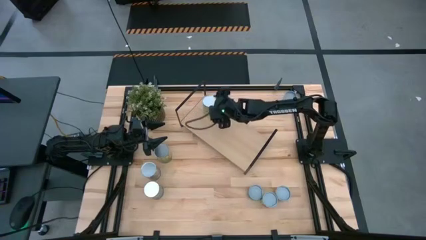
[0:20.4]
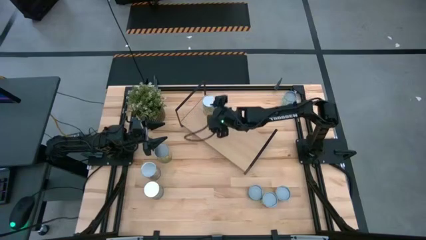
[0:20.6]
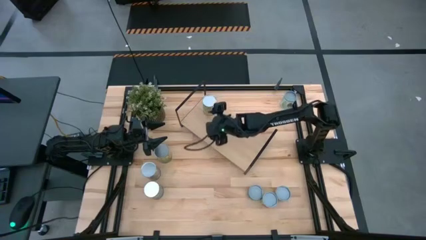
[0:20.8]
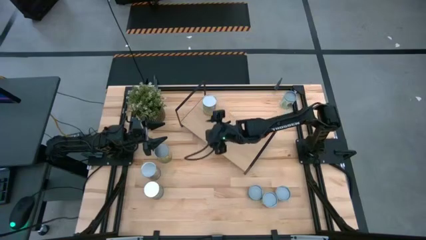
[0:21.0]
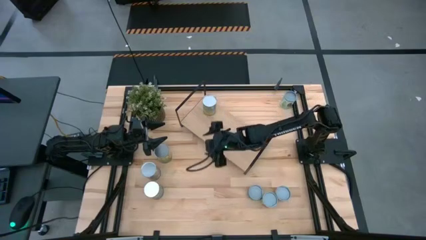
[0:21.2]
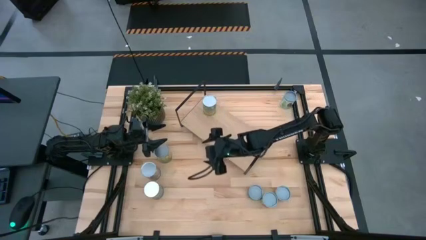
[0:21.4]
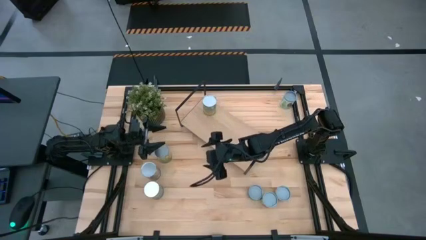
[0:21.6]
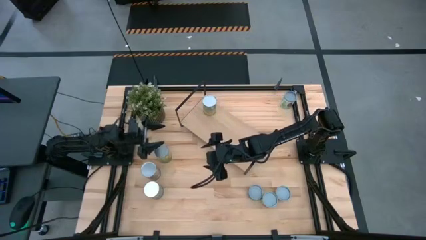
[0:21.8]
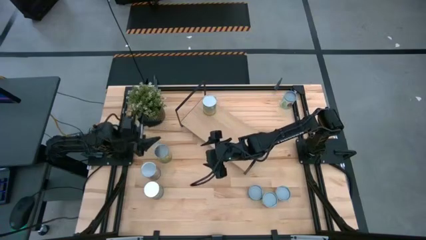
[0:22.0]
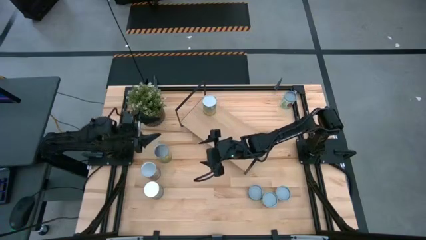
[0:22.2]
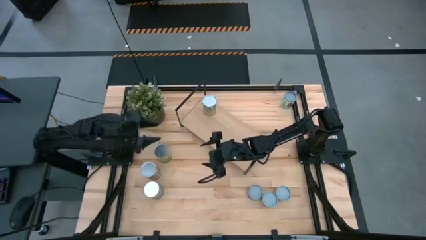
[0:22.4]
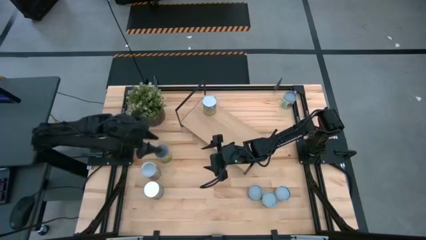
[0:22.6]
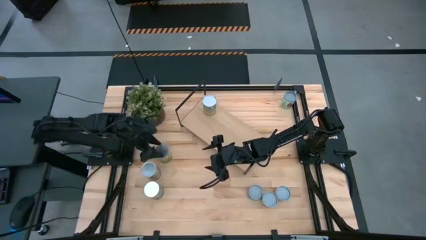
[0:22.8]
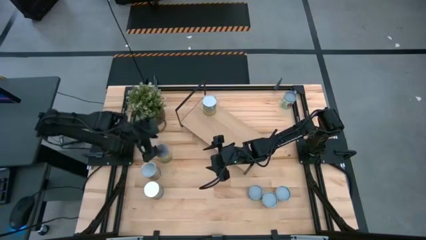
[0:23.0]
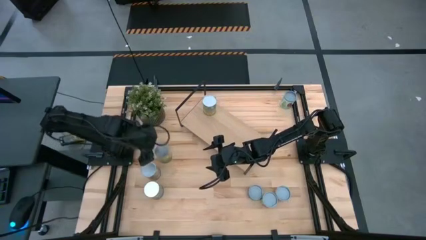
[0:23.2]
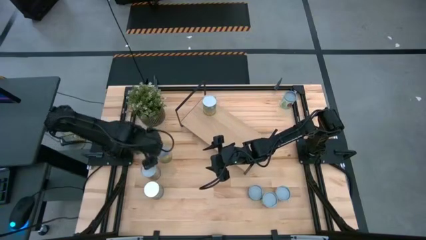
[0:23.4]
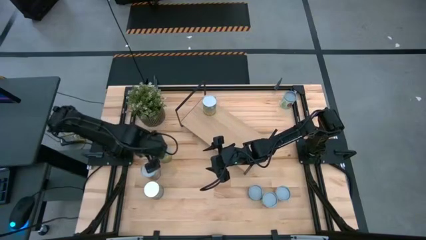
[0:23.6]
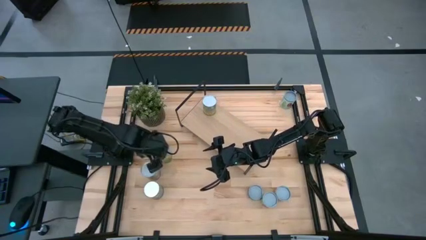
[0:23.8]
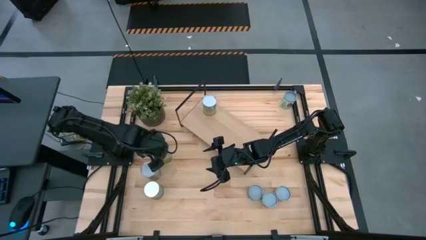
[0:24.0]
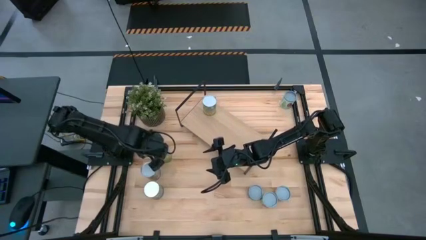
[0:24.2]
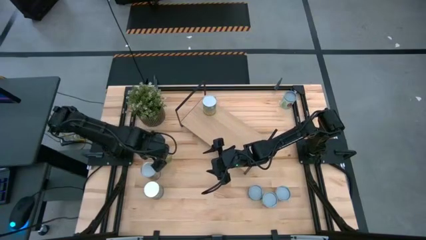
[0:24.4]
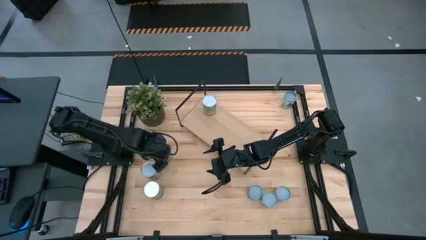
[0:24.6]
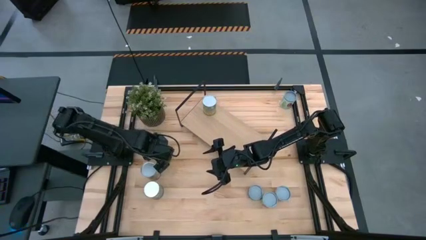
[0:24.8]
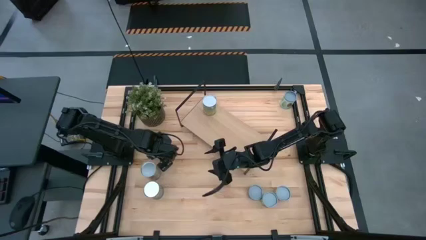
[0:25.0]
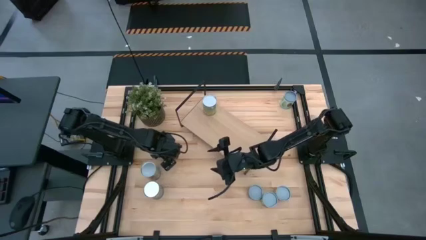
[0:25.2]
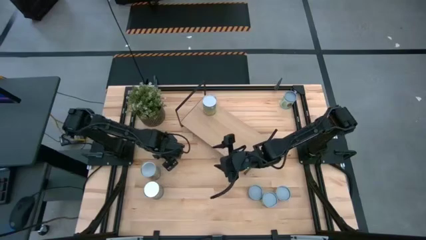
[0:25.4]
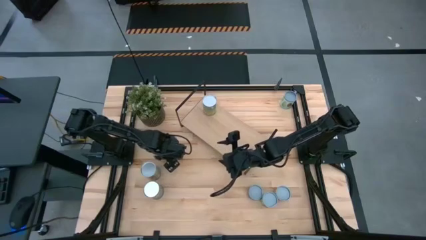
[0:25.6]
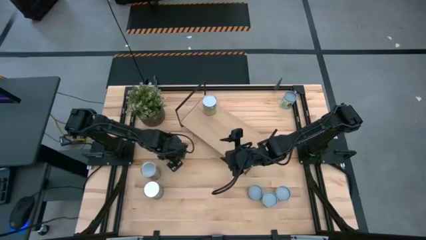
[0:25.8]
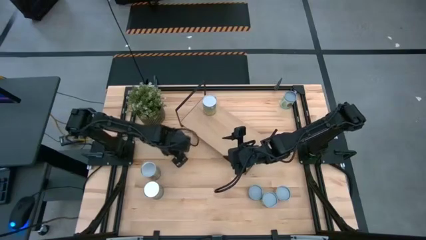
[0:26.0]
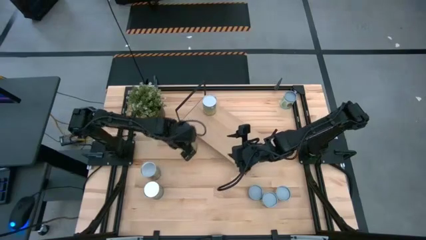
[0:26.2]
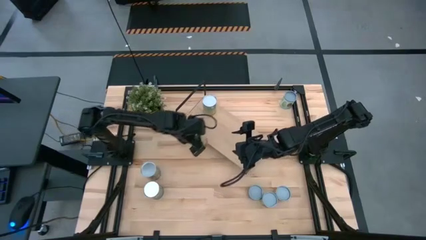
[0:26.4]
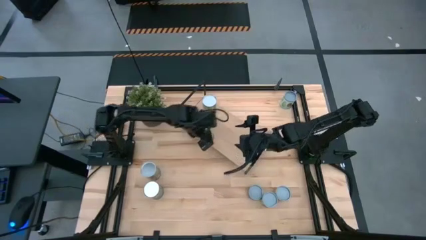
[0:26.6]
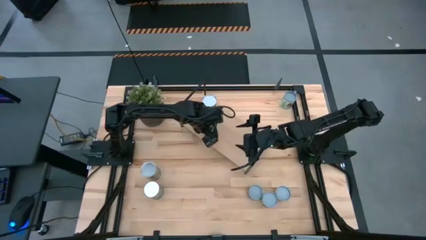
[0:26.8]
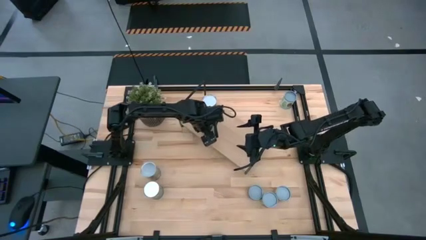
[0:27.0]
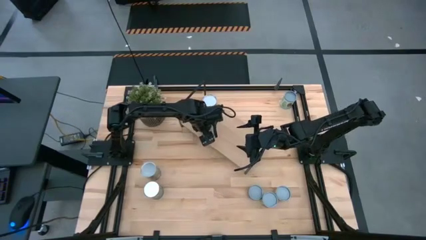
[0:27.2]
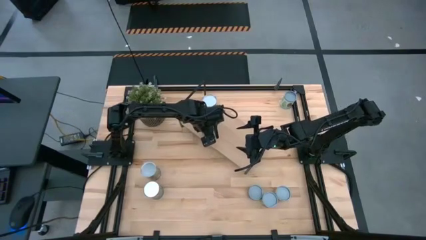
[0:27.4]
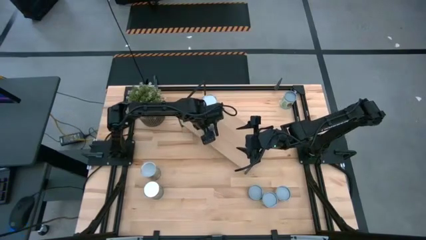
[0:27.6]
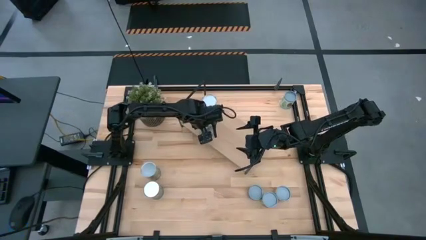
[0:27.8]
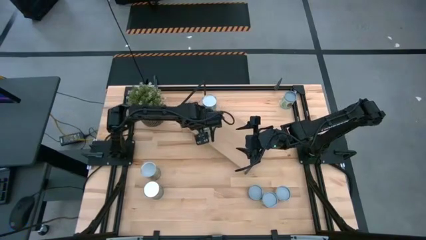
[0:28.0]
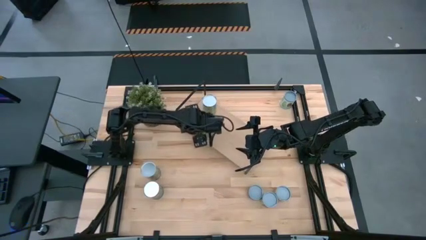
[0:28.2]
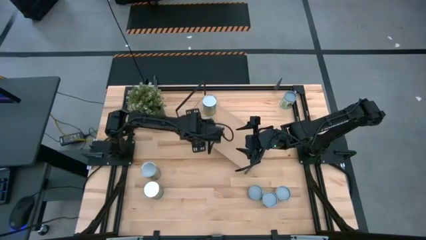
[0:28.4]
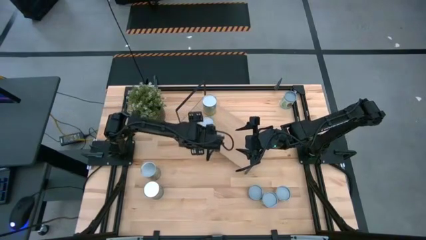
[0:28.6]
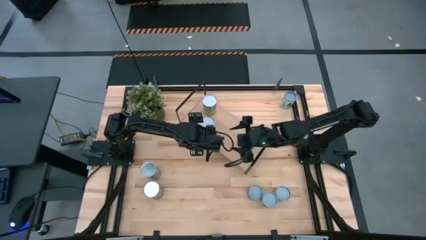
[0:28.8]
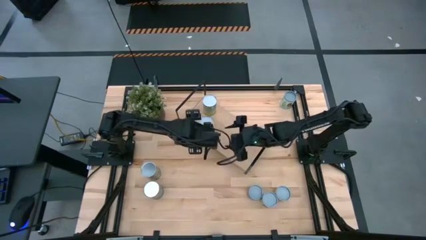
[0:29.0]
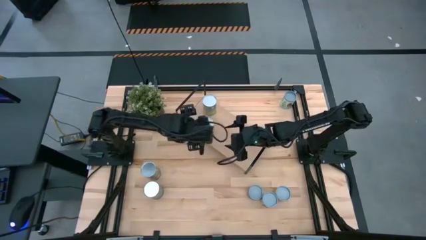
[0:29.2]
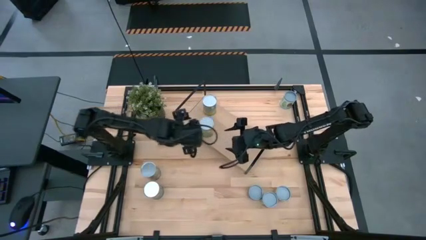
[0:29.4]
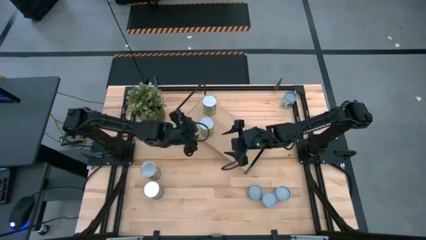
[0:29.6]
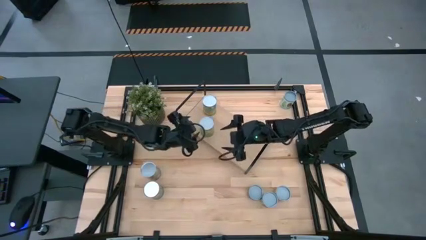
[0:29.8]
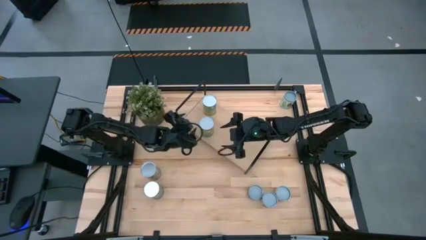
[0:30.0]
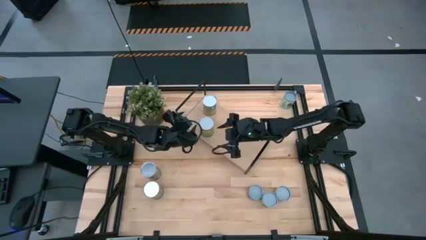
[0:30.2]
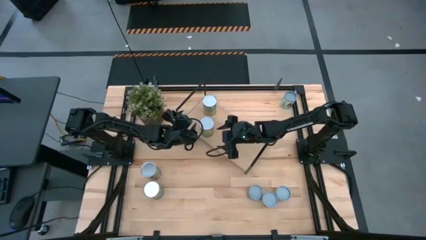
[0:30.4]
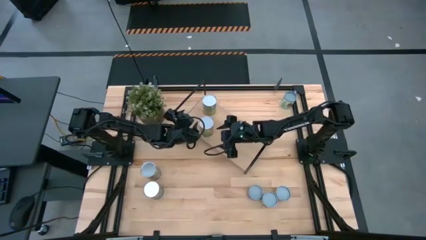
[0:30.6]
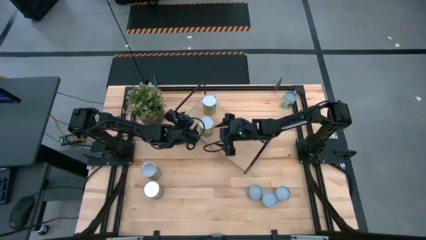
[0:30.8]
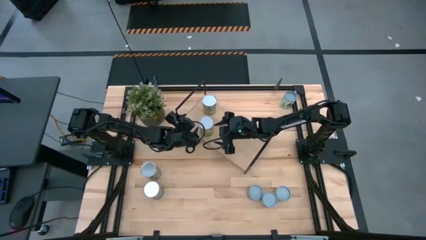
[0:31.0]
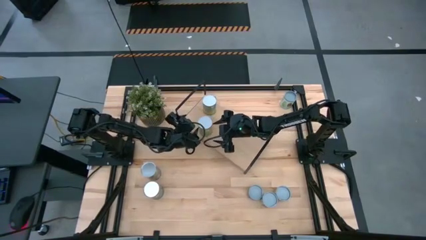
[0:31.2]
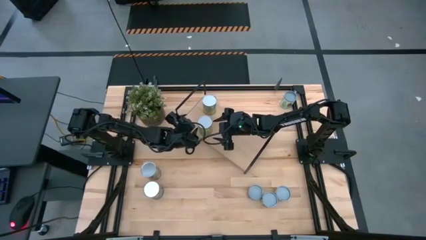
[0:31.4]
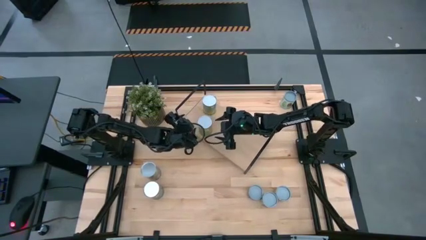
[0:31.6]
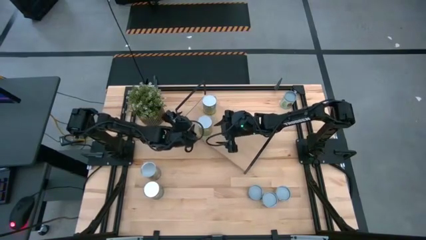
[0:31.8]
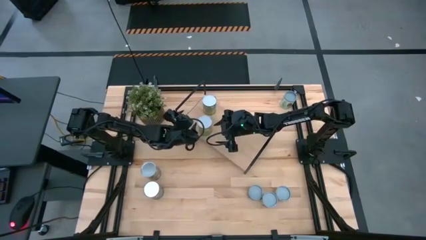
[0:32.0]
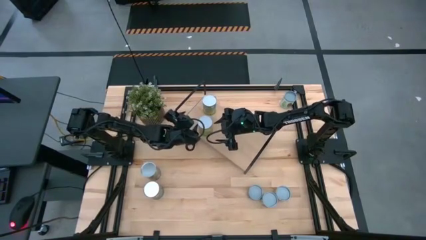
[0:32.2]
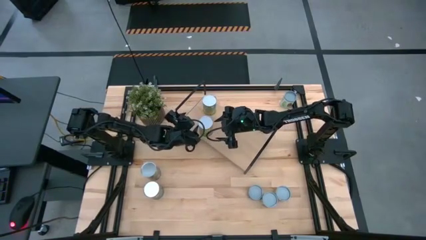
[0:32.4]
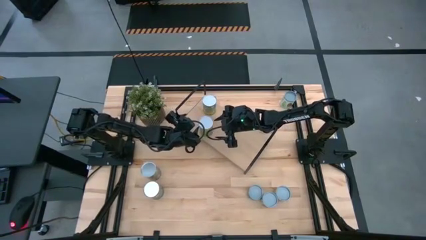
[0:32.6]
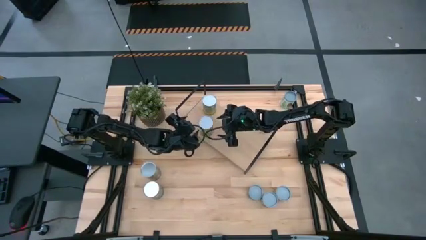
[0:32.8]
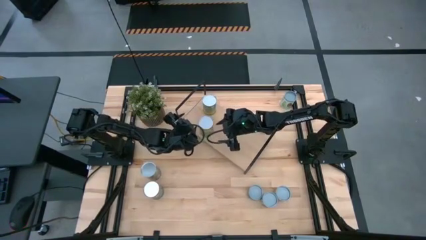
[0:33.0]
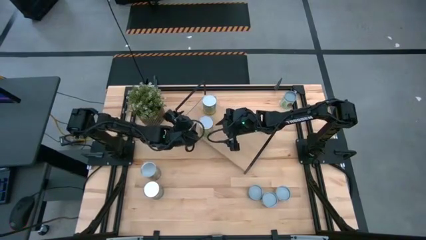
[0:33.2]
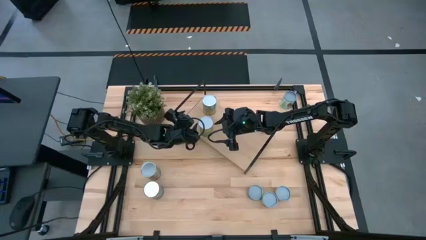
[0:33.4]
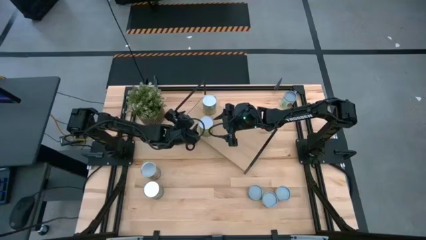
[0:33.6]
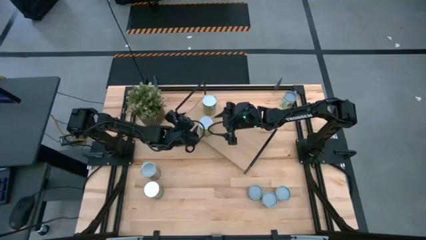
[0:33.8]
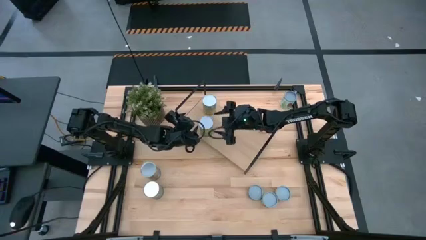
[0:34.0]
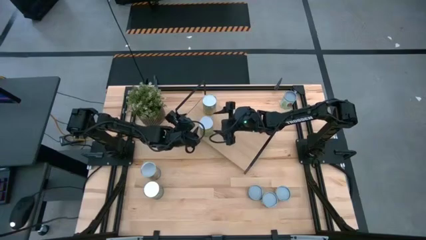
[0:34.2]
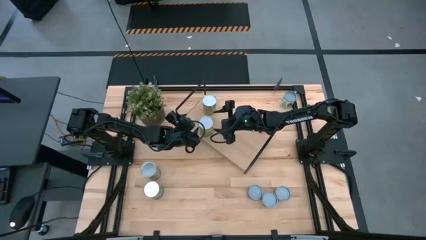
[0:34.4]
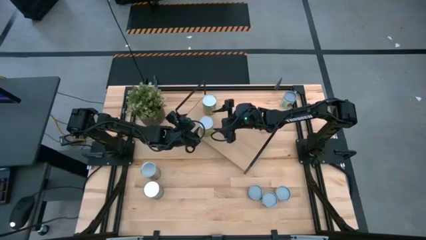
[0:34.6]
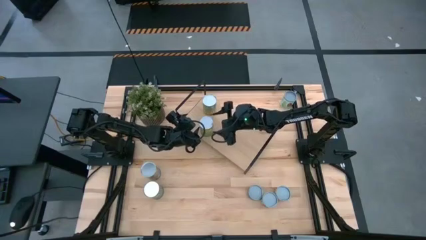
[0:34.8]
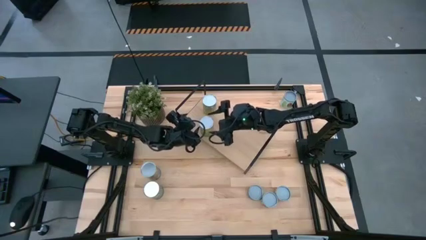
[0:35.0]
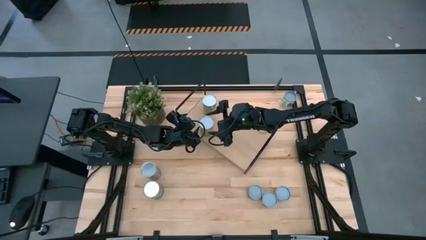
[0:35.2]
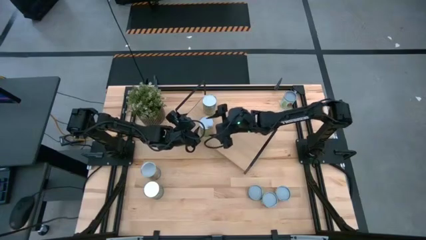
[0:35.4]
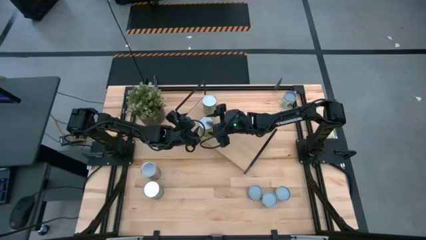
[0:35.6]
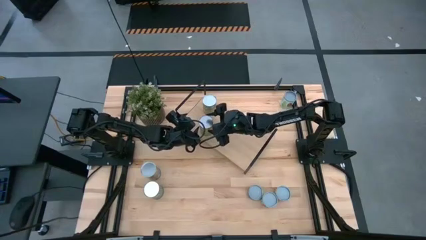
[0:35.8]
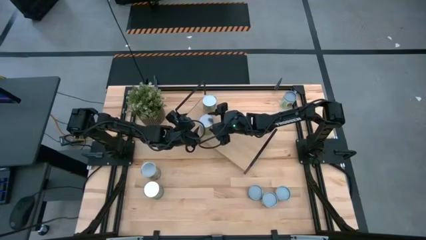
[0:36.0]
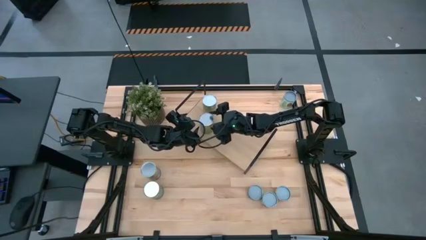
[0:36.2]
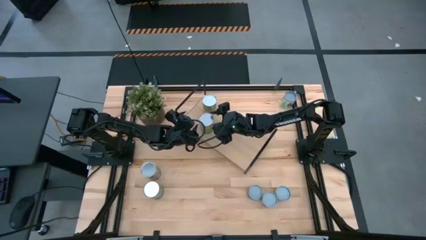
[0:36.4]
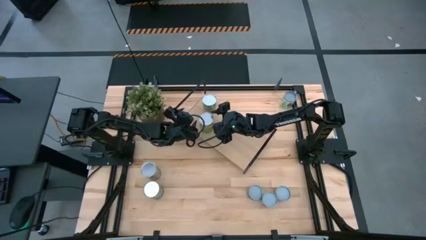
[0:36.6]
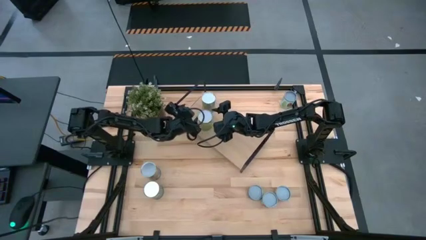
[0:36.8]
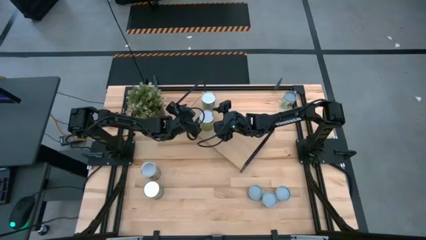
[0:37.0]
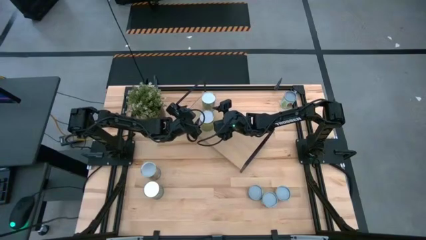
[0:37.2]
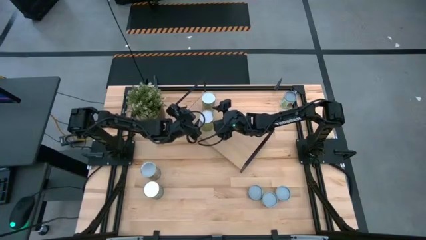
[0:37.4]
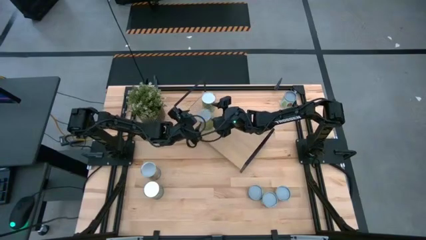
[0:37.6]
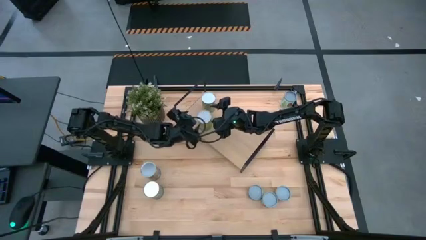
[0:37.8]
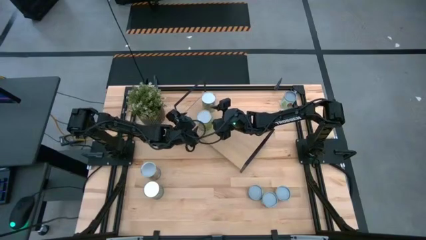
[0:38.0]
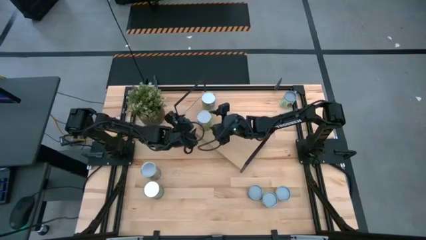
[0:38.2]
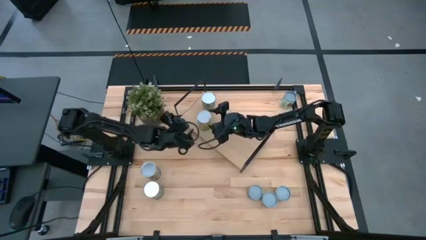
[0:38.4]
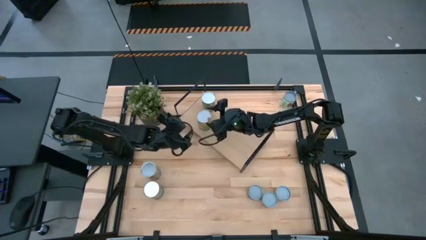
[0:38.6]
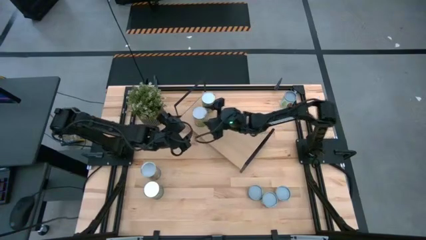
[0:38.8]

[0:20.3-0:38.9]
Task: Pick and place cans onto a shelf
Put the canned oranges on the shelf
